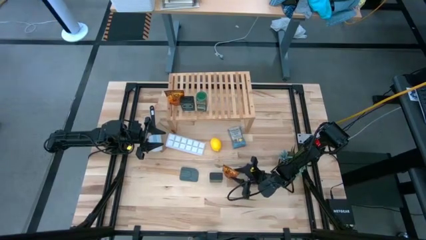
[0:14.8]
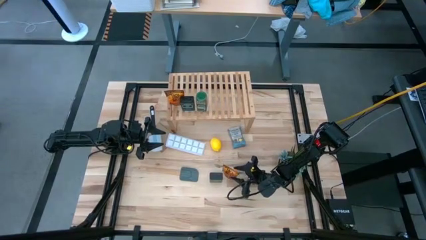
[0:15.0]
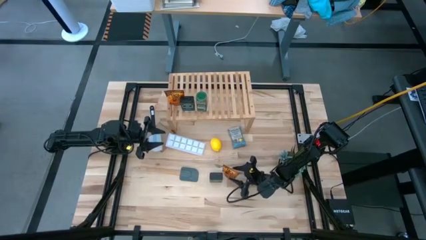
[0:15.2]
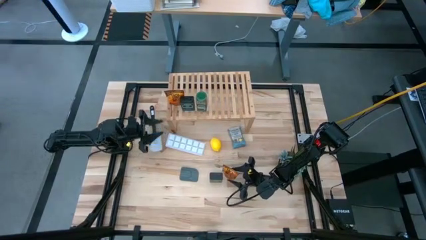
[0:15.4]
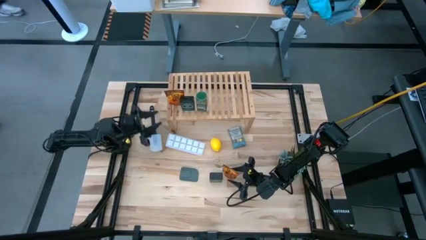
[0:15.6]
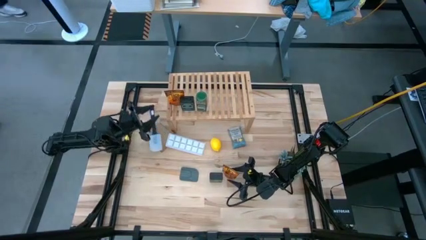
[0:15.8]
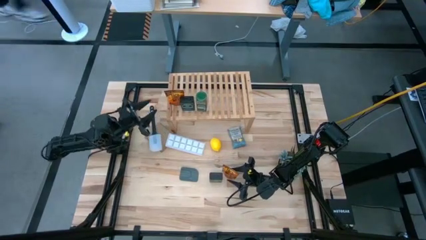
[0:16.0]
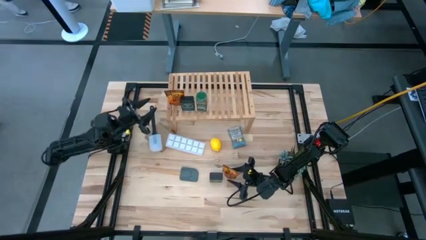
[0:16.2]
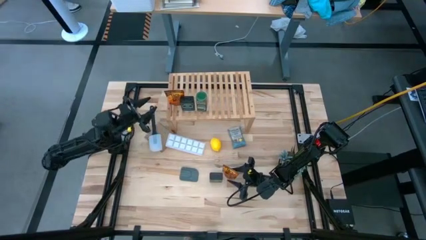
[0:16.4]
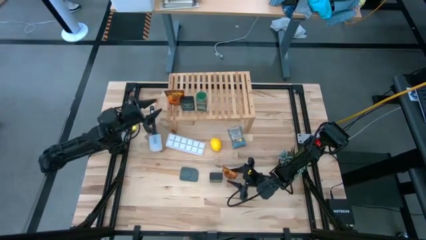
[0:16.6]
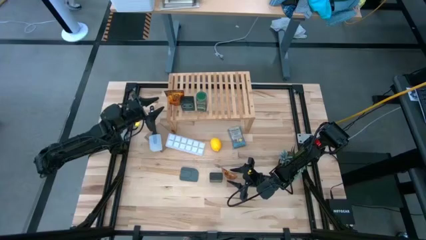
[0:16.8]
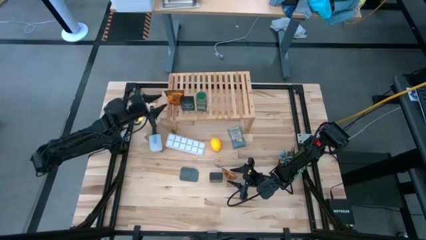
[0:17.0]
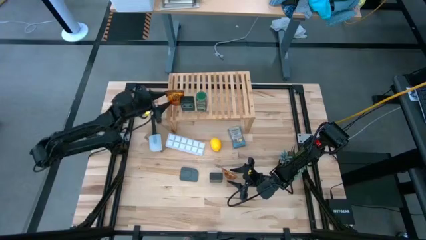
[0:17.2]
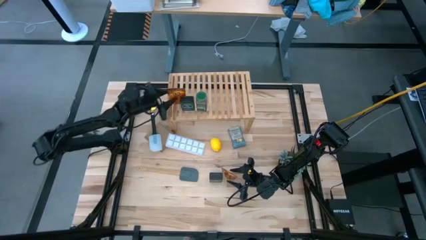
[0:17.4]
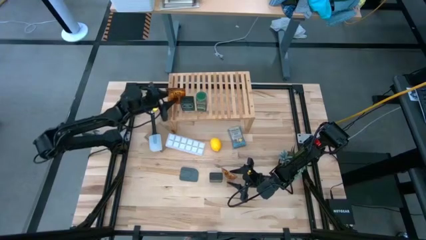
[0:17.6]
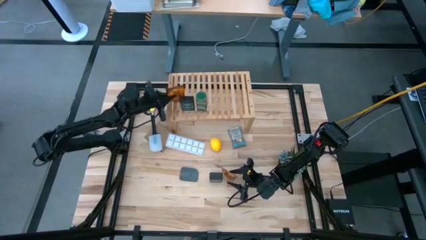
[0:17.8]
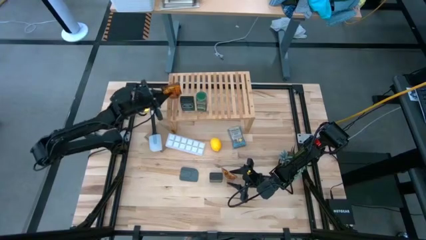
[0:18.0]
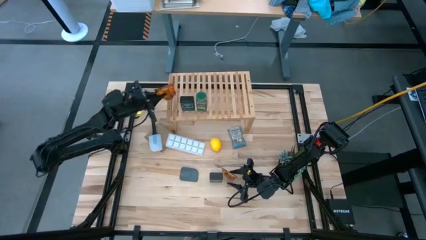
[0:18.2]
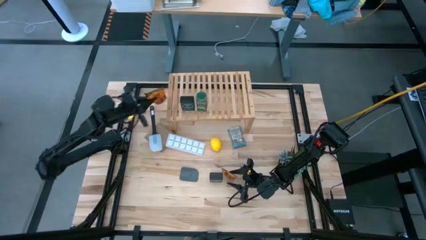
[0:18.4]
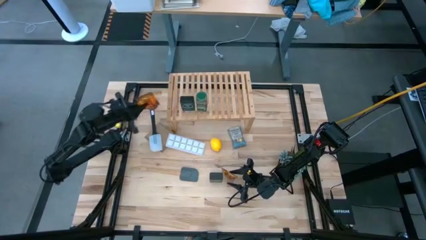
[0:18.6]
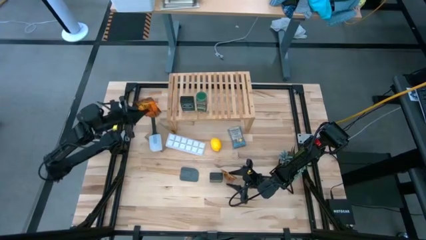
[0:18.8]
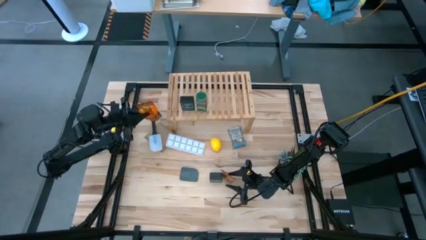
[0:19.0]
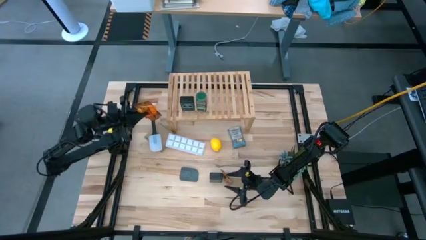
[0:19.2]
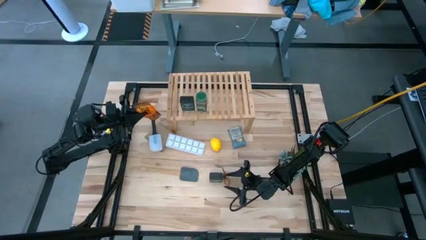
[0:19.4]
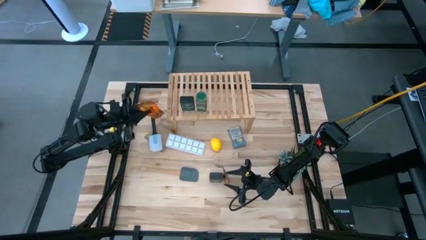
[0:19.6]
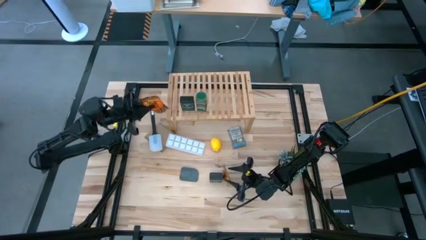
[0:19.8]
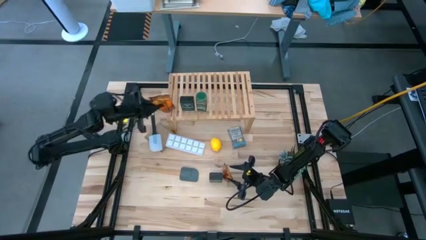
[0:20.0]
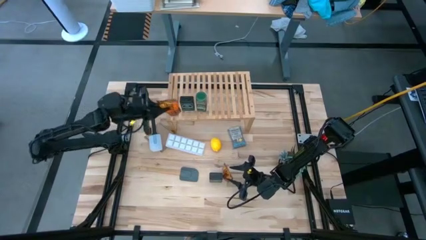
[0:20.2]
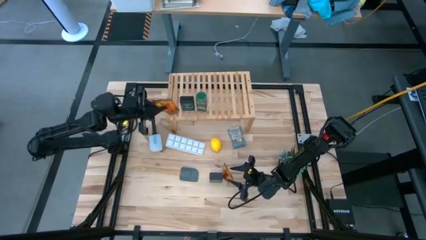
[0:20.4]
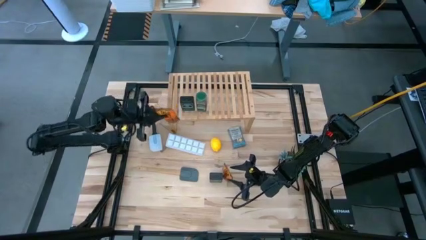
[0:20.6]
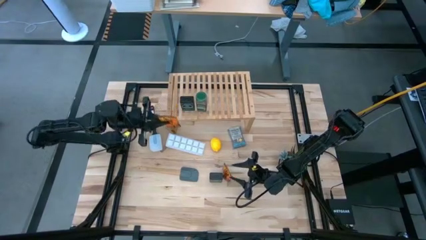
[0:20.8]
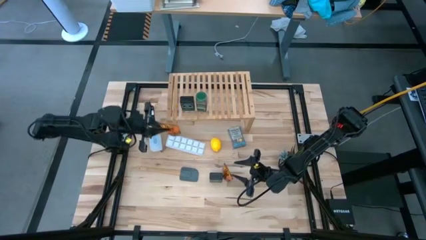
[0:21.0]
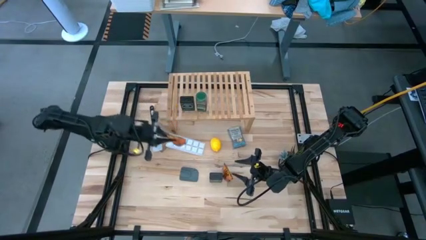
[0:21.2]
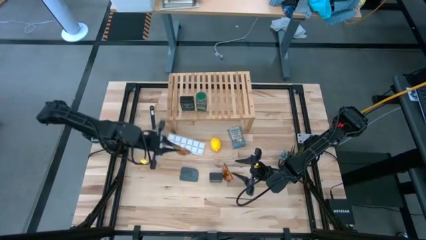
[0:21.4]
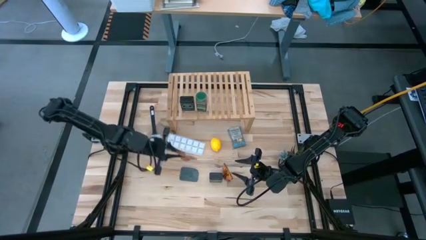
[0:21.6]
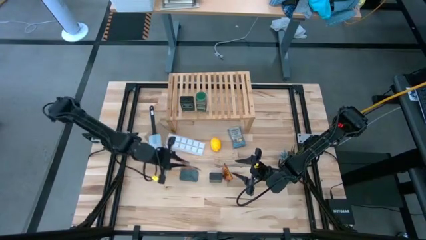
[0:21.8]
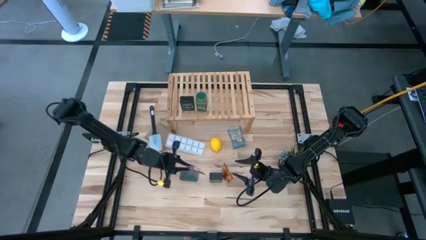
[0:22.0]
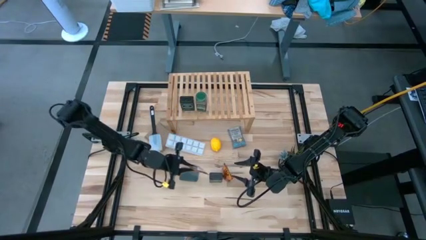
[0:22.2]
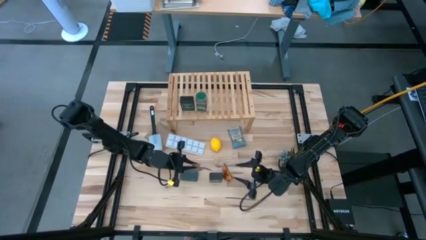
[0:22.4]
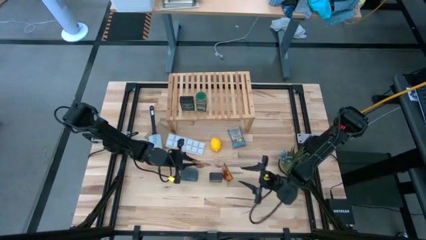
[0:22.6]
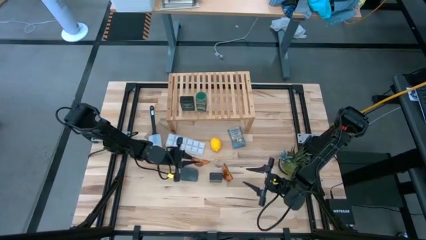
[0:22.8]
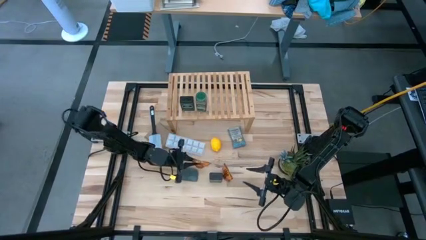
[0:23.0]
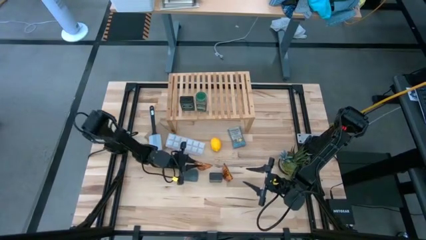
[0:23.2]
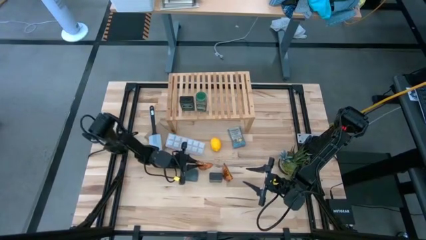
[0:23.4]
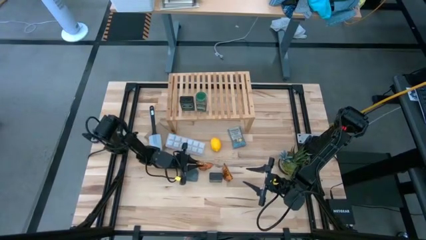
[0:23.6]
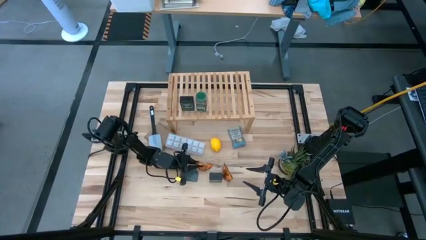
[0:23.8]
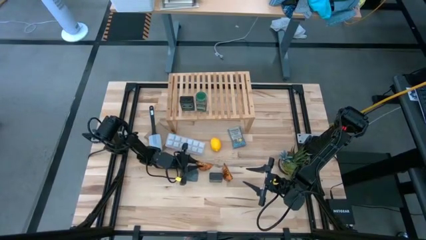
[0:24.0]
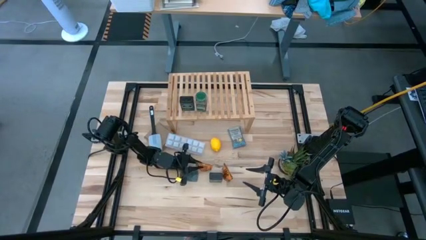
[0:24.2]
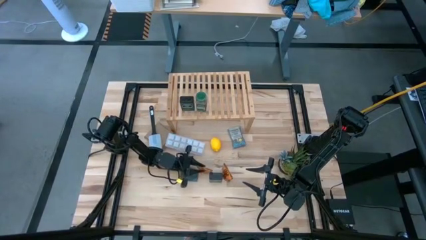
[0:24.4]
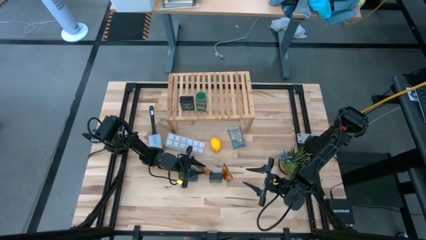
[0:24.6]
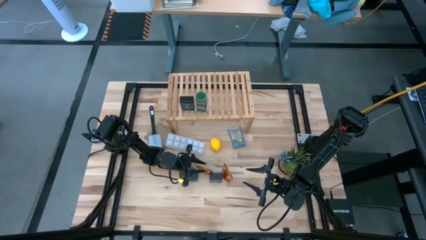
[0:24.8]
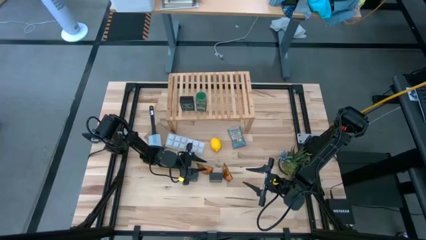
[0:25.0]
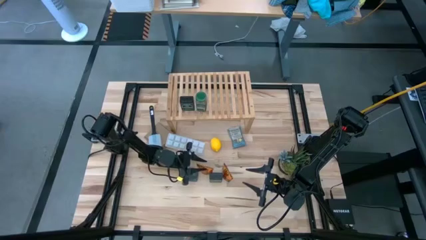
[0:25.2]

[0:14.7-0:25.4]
Task: Shelf spices
Remove the orange seasoning pouch from the shelf

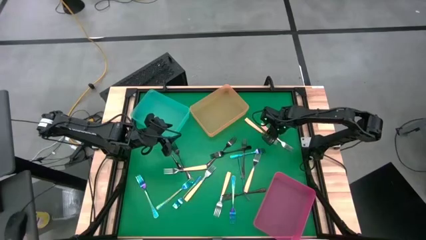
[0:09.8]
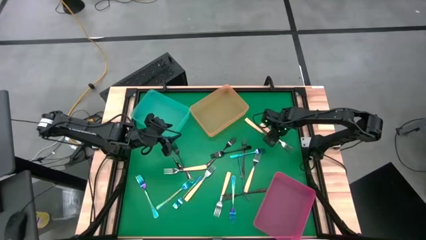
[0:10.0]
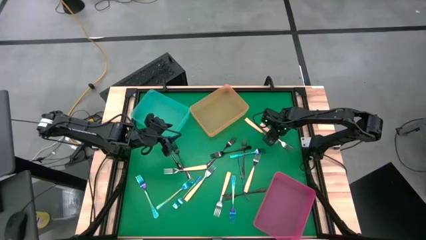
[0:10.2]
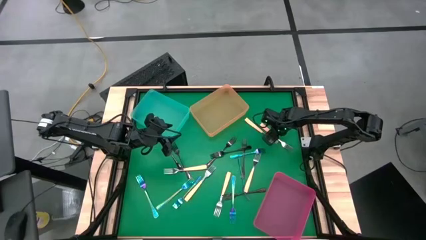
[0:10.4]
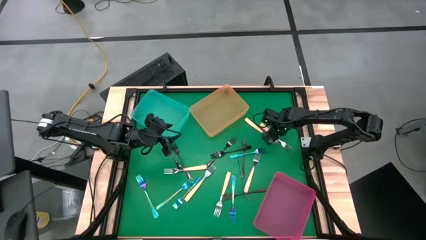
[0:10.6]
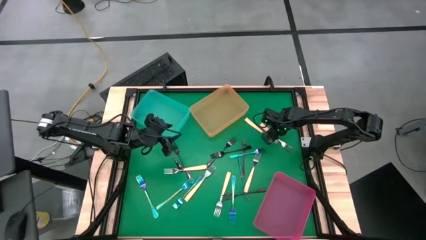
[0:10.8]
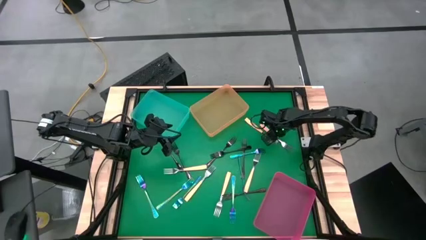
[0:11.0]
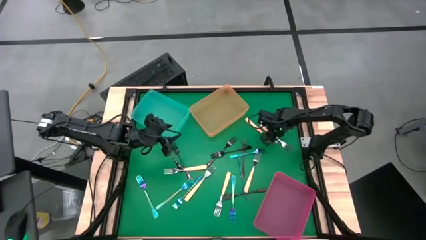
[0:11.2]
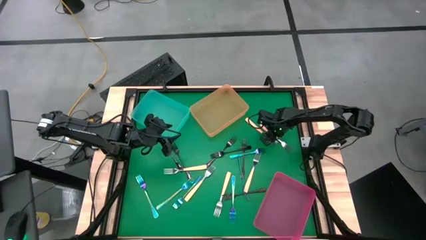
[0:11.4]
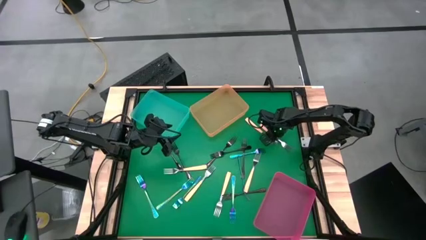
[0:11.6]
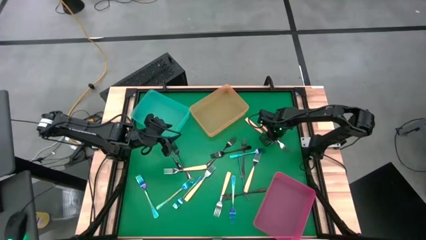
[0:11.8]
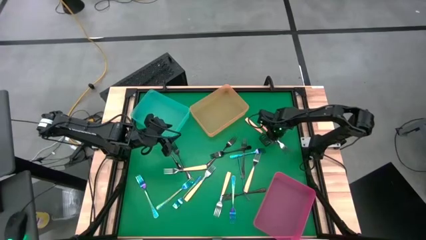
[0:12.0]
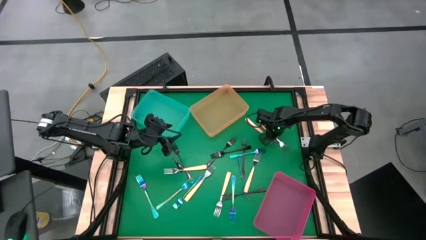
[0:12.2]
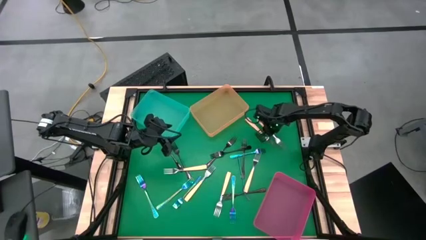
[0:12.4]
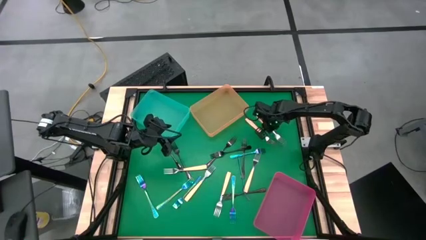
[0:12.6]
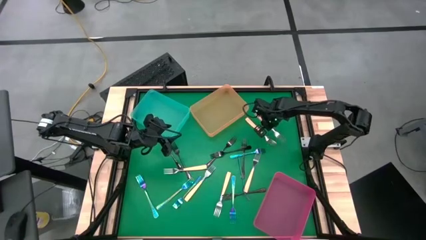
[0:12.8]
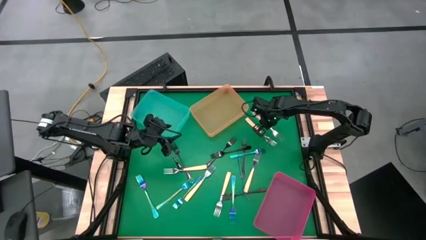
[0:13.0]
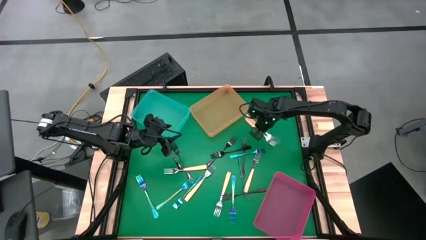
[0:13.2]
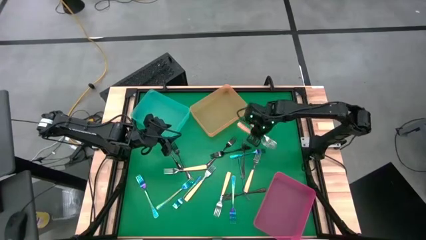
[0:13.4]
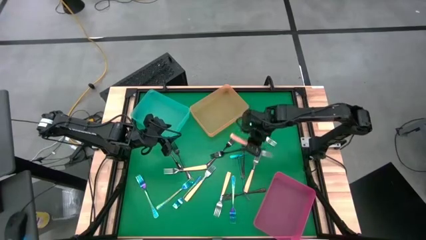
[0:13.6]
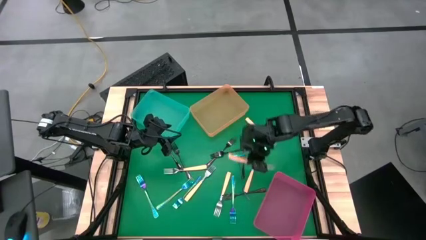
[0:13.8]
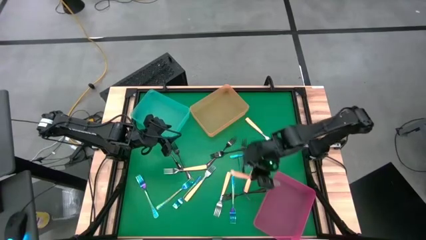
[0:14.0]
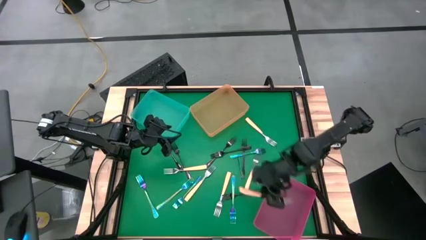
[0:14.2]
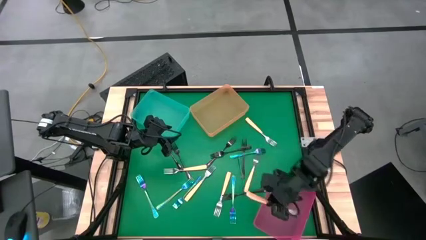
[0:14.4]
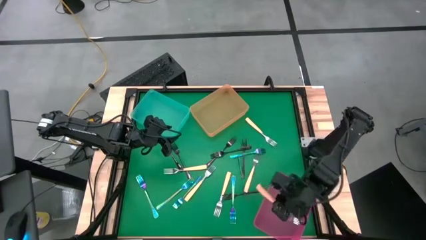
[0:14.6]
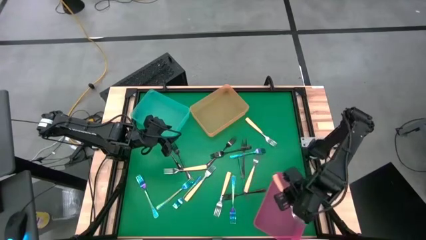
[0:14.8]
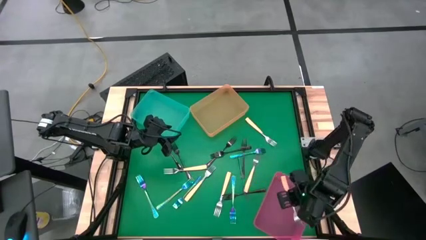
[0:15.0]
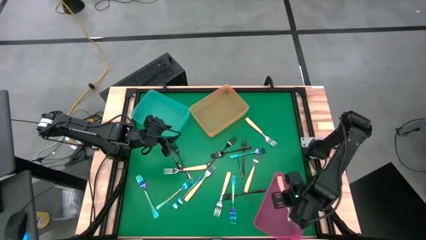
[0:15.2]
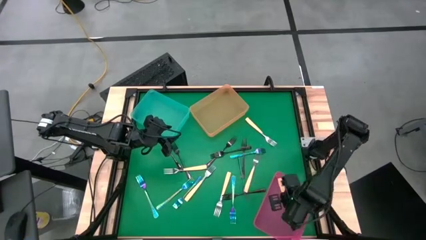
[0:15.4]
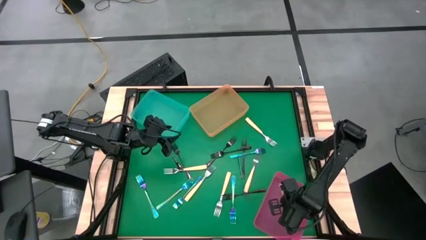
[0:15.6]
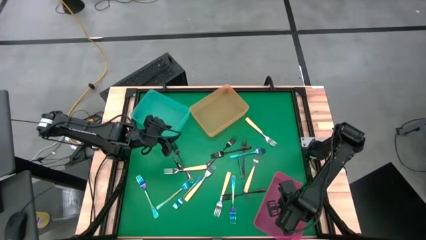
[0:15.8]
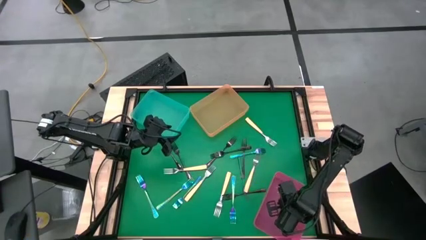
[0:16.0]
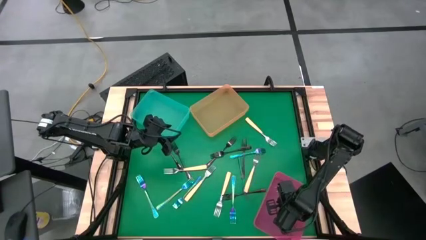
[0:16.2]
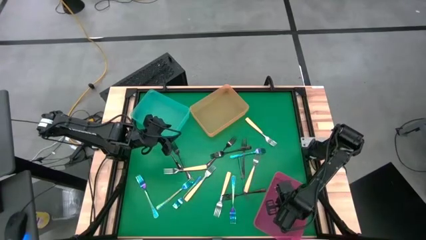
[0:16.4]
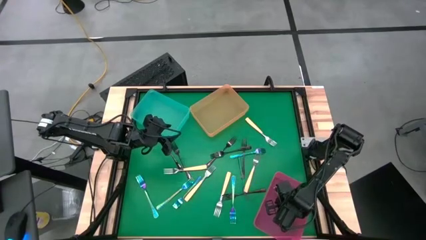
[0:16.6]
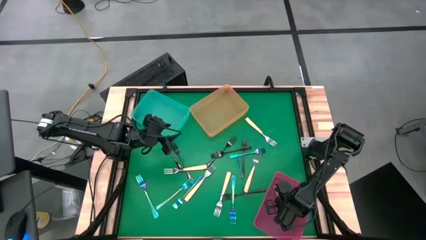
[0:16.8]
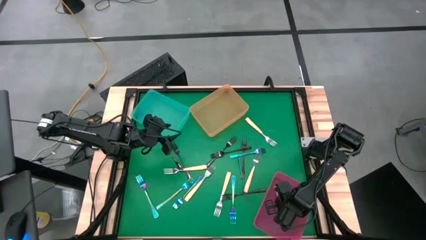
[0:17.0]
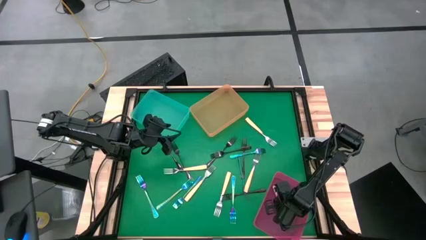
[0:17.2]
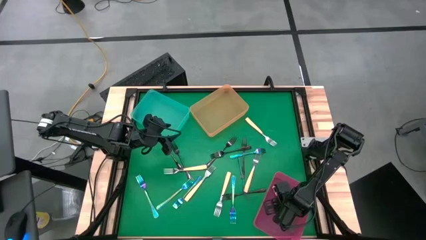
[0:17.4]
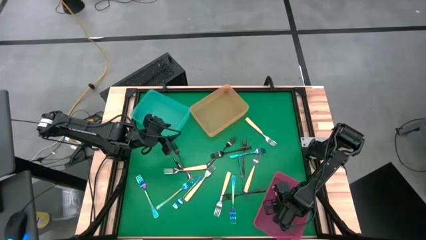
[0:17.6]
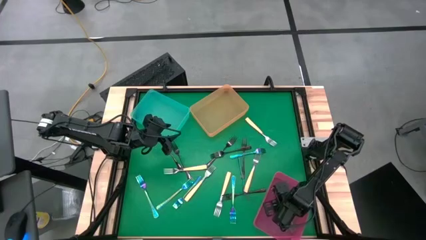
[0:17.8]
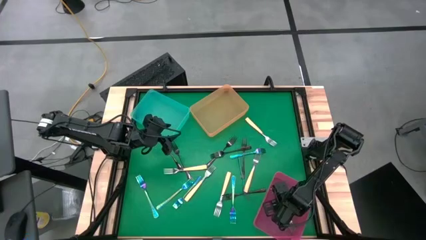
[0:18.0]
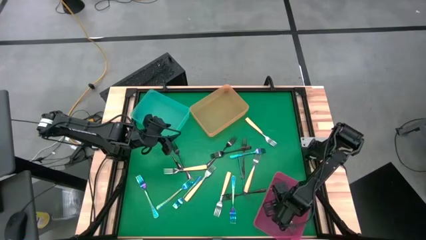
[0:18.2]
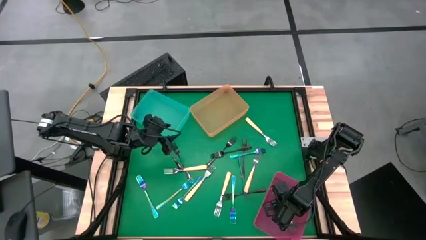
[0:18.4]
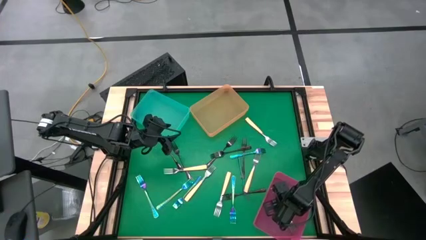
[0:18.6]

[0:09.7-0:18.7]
Task: Sort silverware by color (type)
Put the yellow fork into the pink bin
